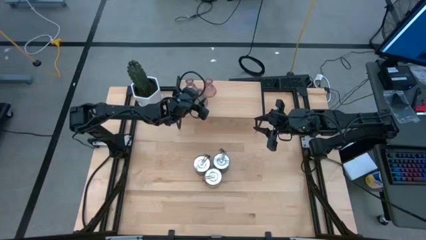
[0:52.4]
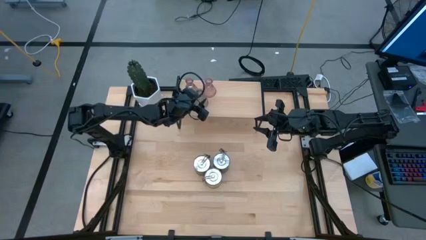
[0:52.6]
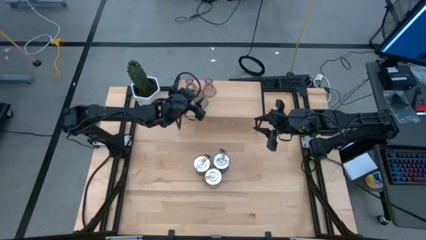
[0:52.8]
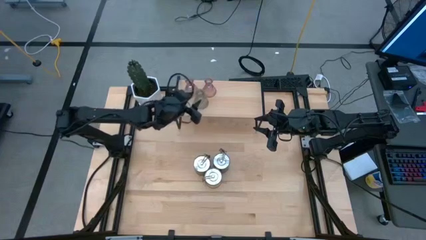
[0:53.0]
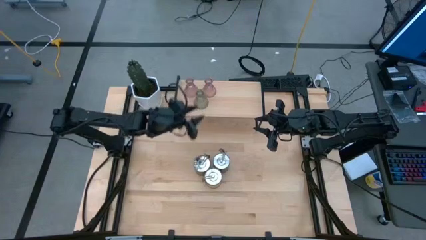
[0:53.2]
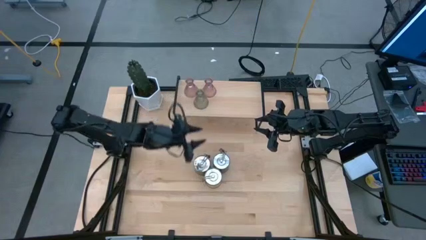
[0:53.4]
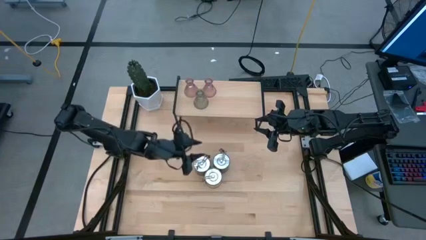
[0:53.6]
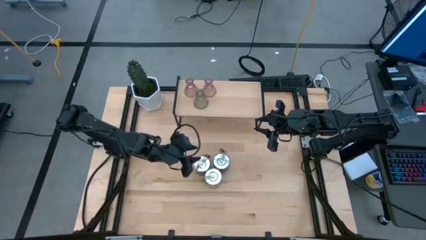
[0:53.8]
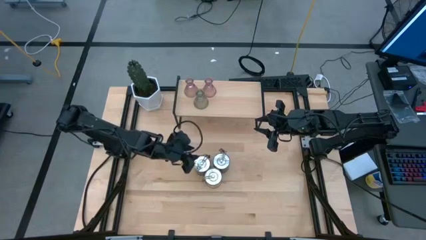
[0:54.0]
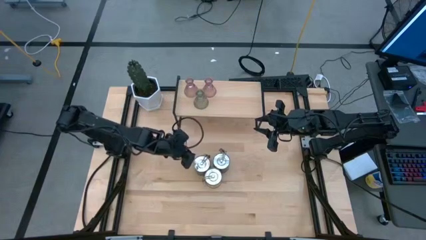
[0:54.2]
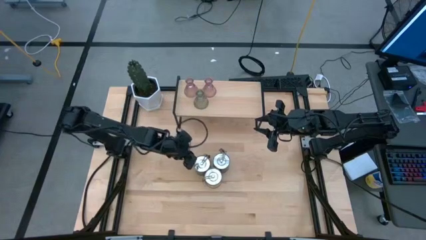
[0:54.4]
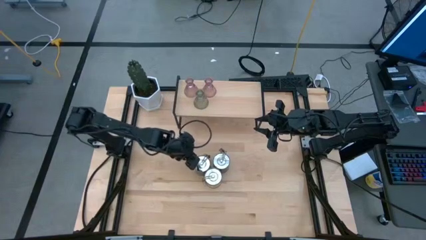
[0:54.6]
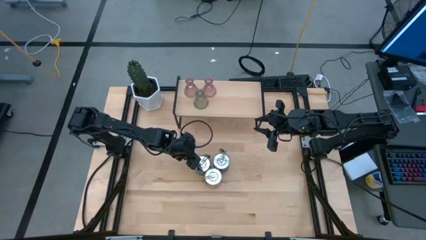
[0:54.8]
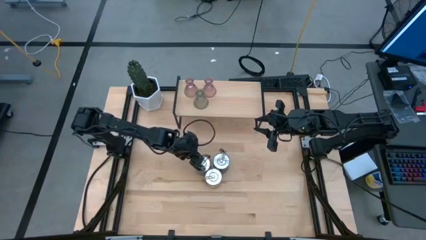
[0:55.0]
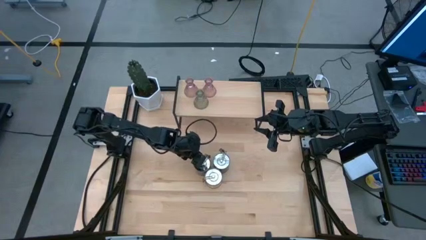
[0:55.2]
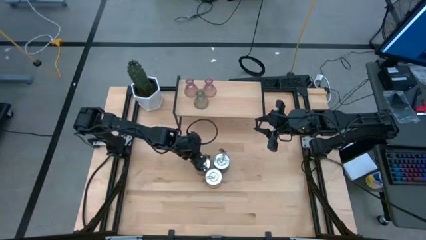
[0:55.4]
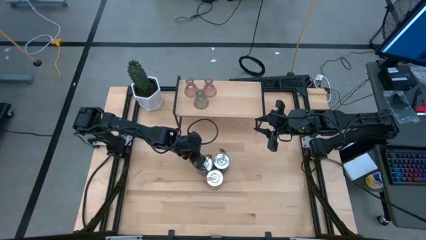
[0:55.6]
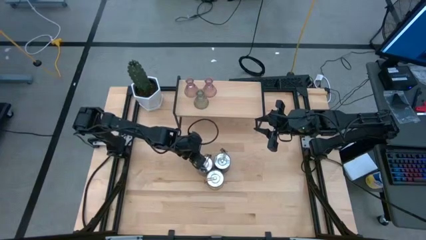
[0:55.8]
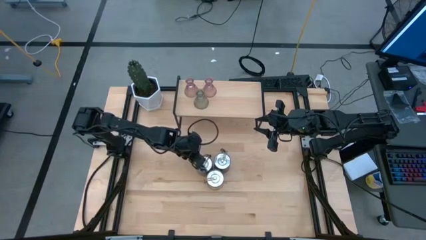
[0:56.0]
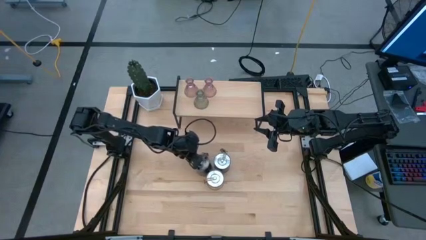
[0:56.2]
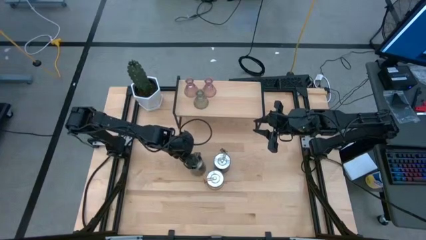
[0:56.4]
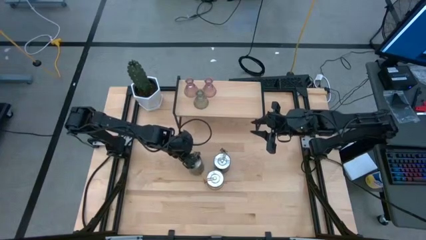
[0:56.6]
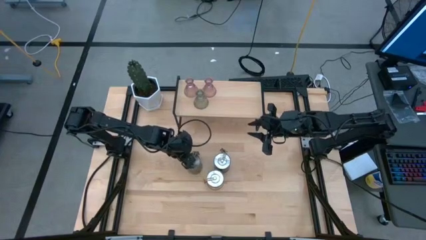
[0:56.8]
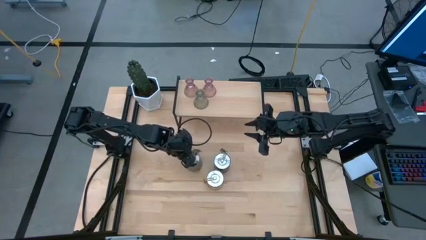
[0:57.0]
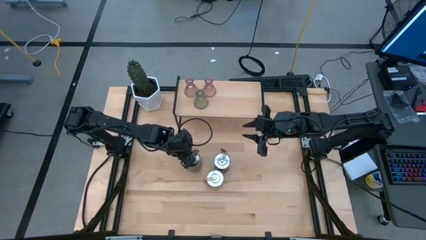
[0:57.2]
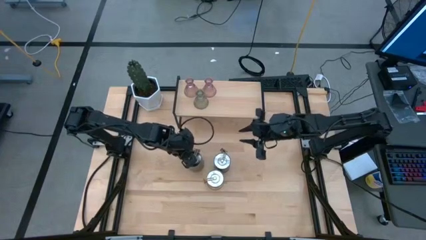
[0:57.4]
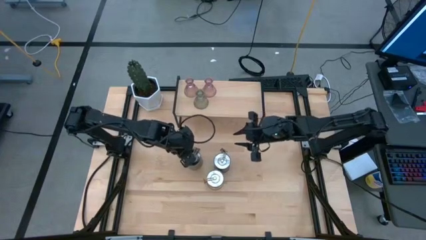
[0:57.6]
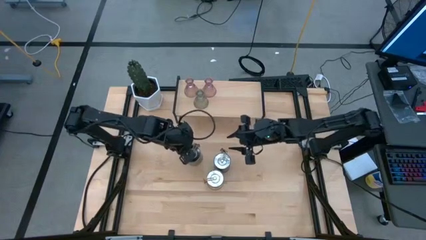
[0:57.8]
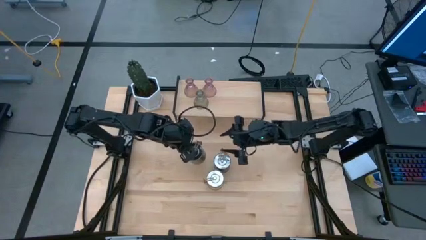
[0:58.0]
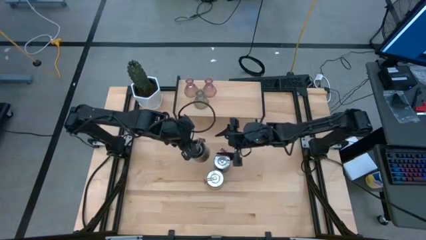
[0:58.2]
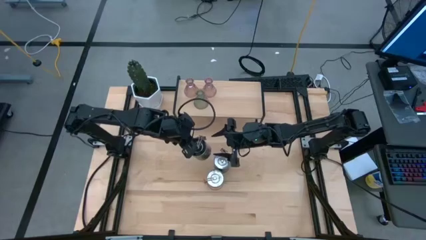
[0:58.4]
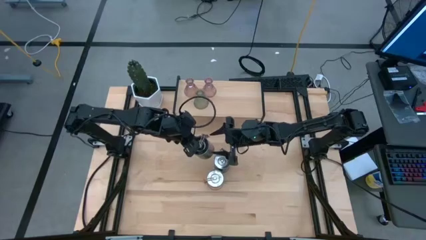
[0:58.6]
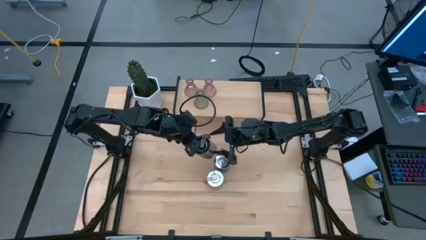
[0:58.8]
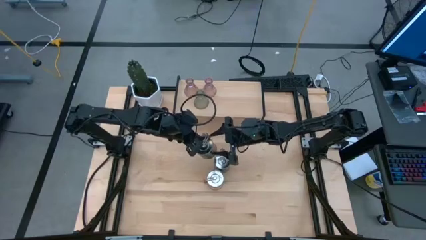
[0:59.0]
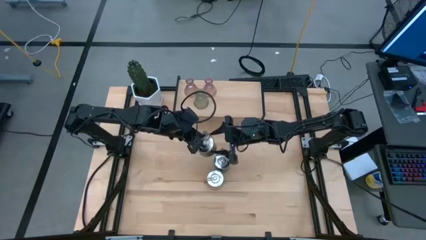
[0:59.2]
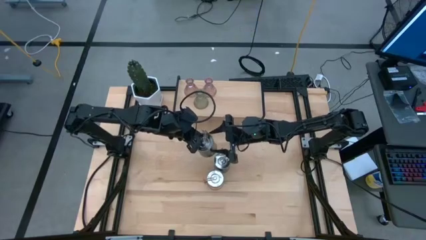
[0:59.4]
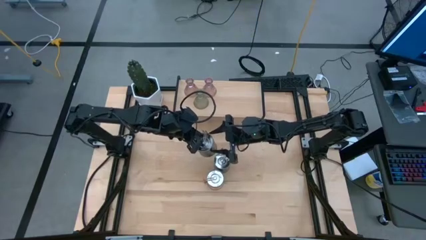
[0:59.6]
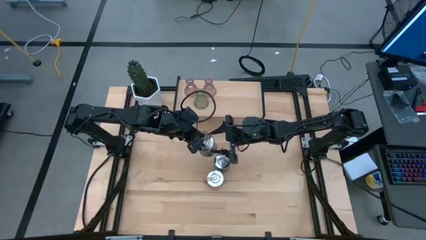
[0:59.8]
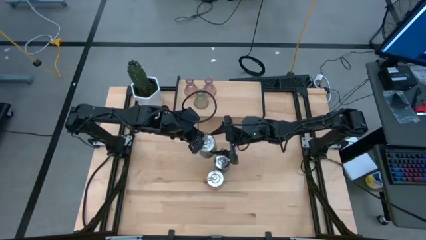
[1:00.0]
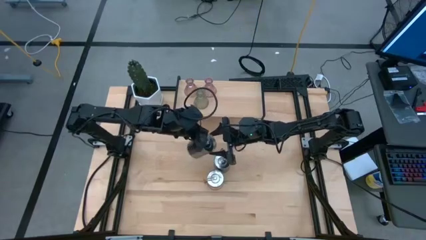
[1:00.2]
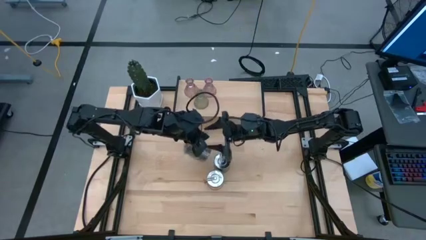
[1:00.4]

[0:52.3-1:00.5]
Task: Pick & Place candle stick holders
Put the left brown scented candle on the shelf

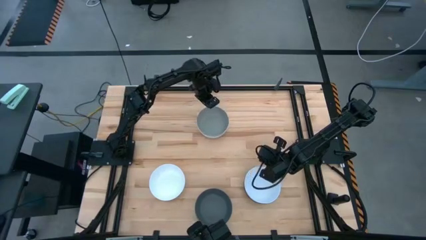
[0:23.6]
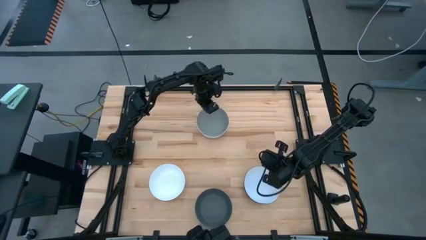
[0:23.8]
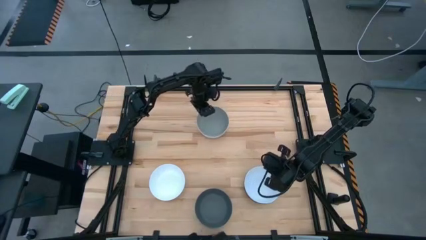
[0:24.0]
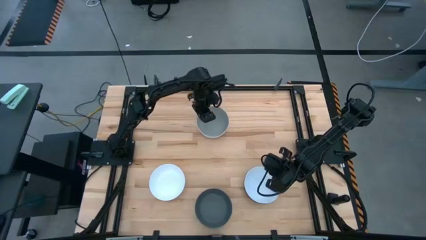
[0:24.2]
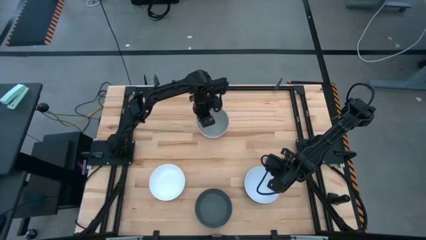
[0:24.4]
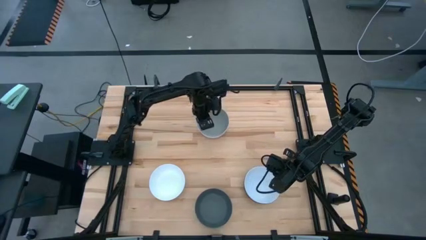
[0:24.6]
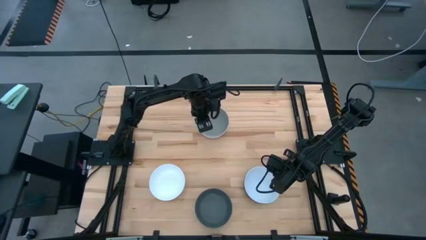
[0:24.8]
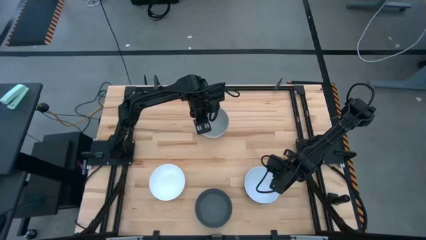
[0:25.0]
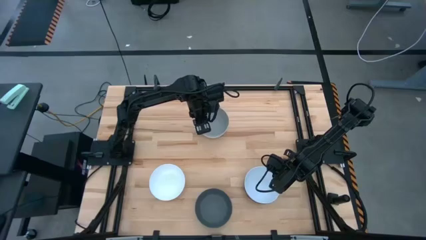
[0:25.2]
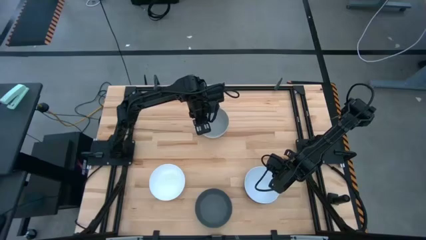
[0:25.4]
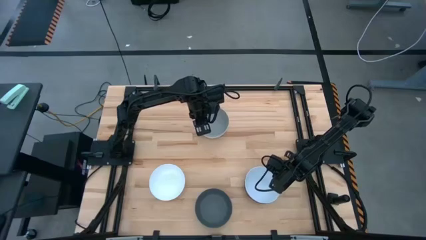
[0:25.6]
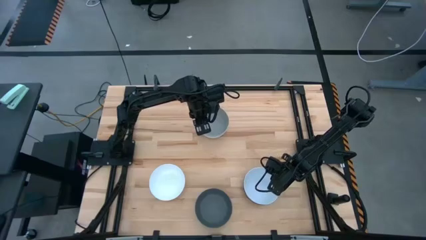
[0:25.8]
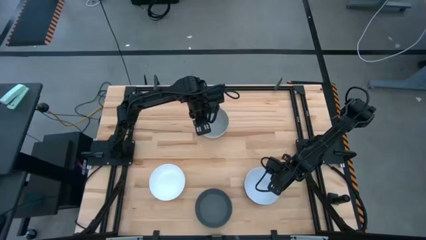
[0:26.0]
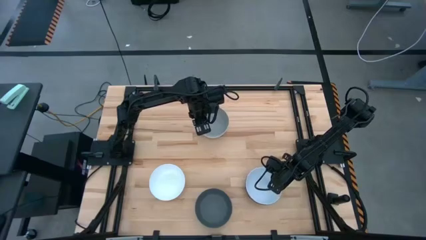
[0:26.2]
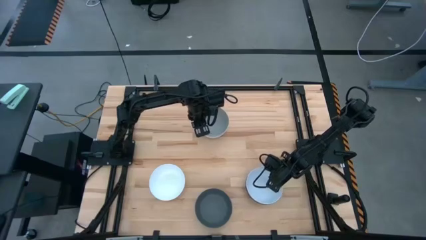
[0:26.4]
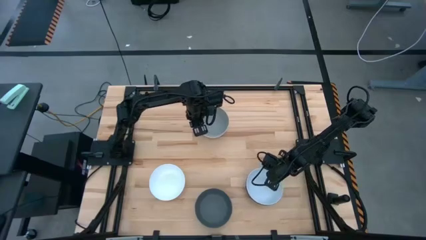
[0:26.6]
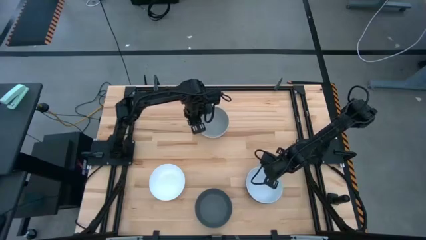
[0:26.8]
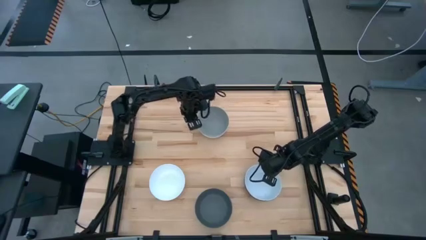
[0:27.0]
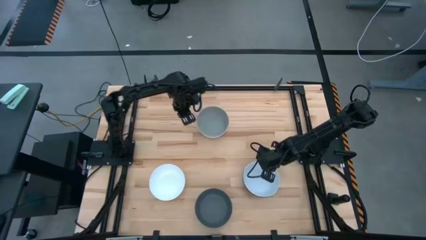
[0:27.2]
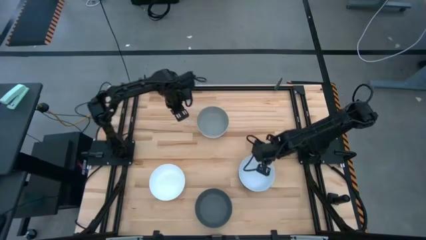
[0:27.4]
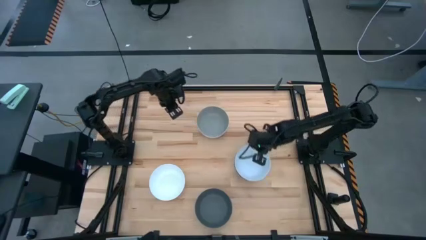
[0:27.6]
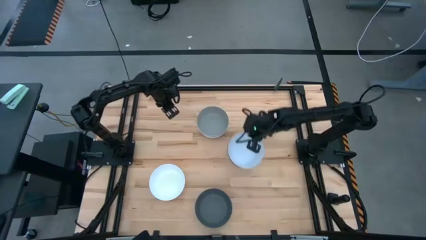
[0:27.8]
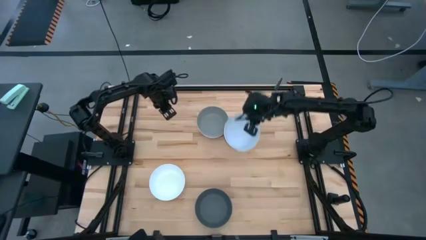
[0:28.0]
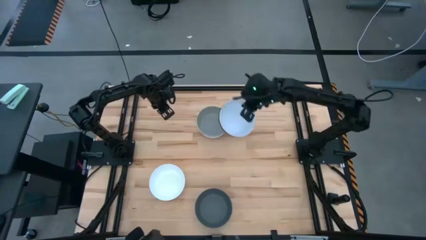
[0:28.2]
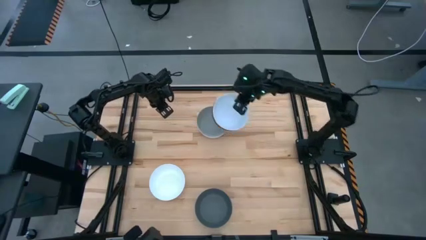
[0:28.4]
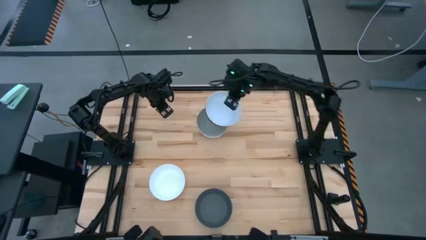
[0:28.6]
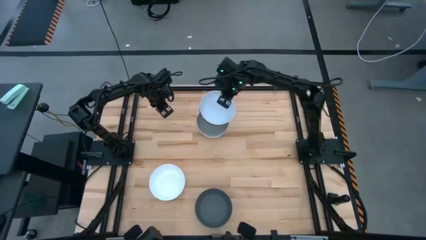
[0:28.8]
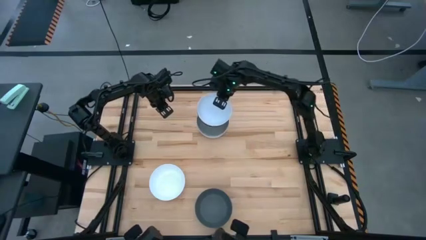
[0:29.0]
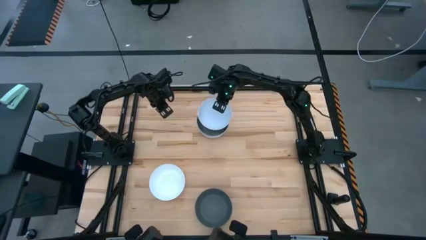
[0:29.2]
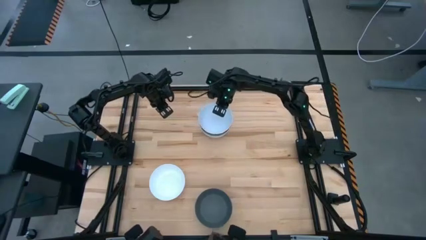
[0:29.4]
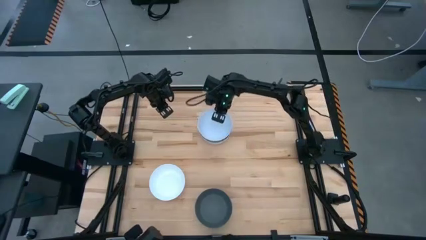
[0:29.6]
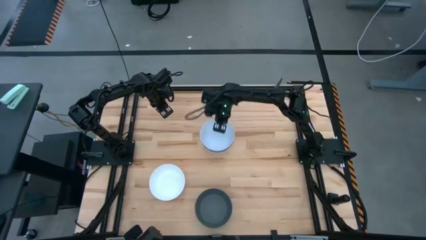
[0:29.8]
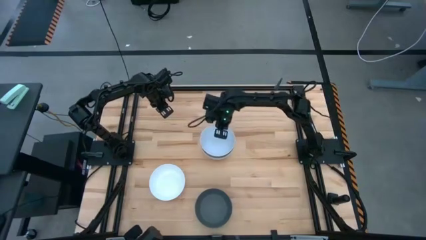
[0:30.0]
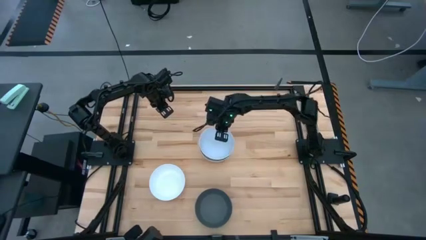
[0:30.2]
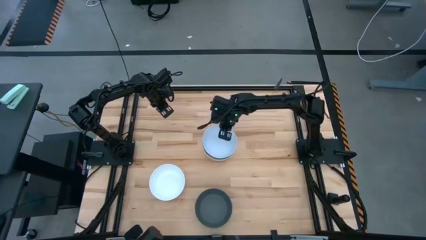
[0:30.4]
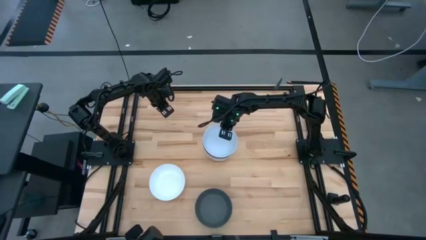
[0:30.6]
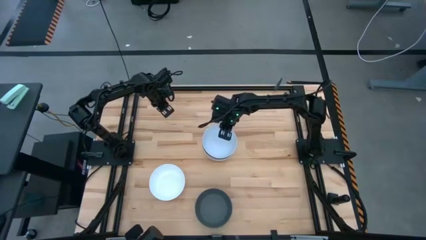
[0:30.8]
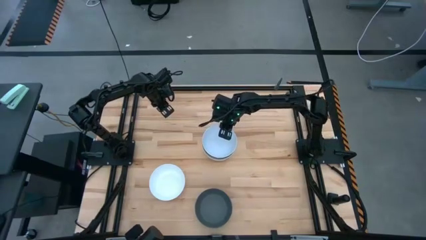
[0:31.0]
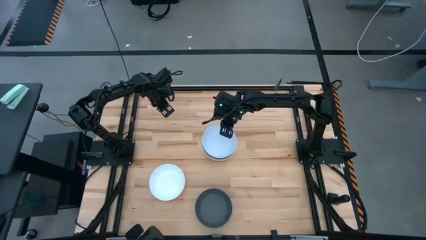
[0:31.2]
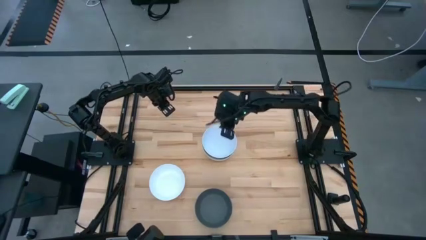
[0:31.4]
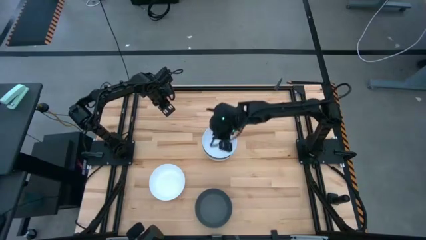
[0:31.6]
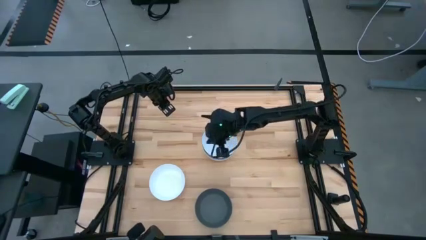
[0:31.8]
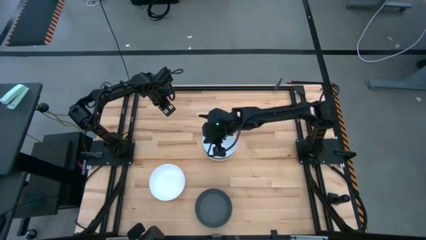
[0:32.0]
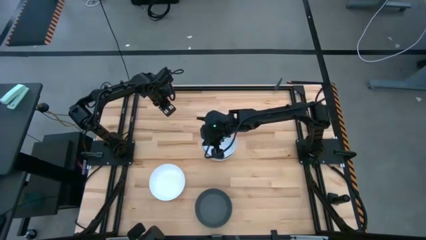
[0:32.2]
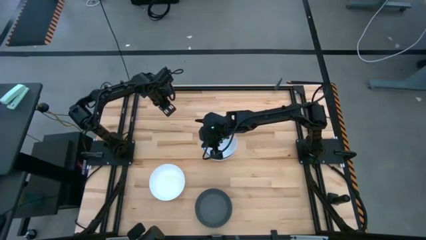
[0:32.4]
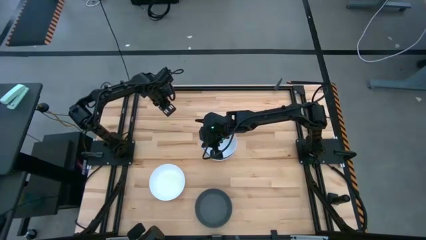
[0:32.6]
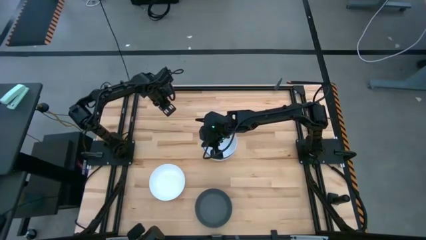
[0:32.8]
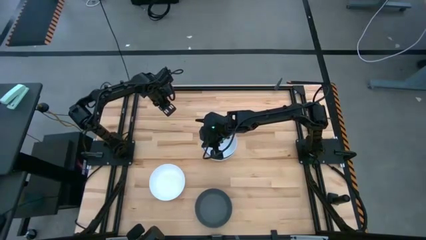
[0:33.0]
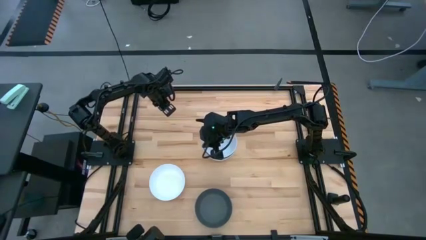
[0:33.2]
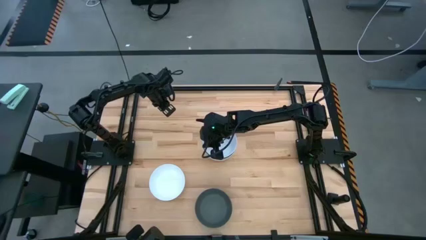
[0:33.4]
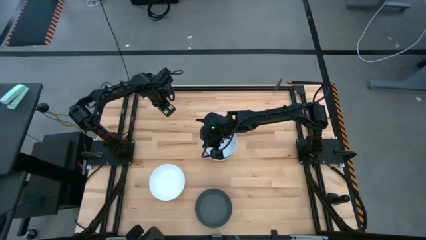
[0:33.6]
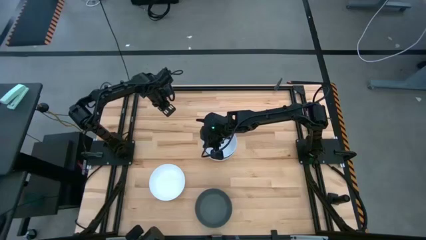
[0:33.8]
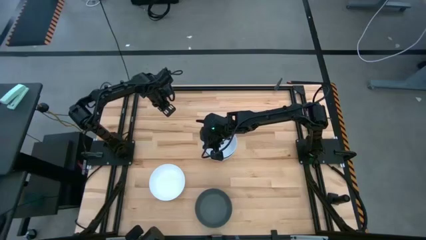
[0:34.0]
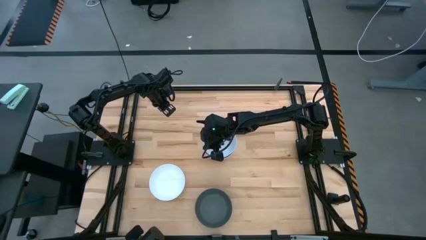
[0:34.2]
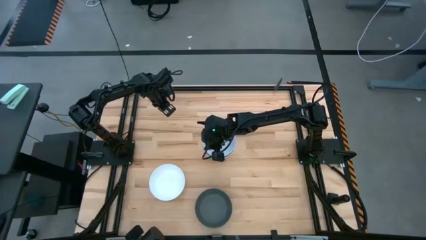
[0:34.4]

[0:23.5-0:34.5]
Task: Nest bowls inside each other
Stack the bottom stacked bowls on top of the top stacked bowls
